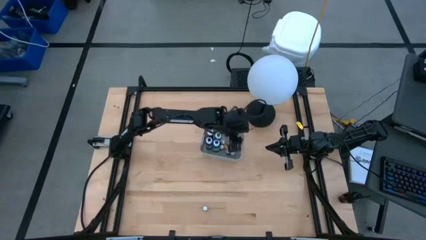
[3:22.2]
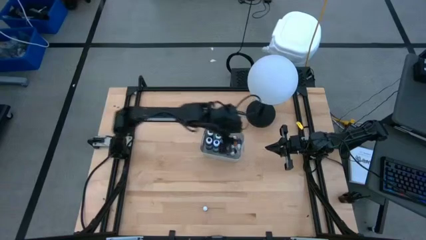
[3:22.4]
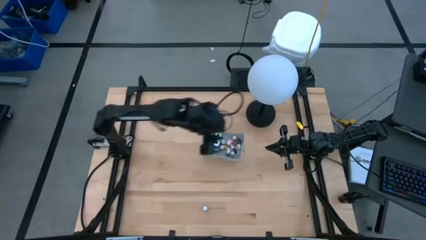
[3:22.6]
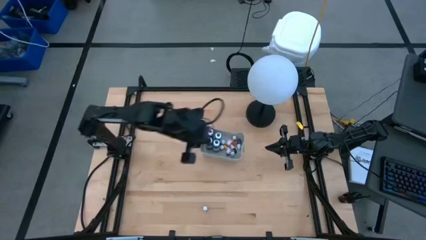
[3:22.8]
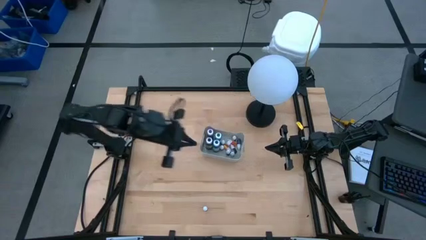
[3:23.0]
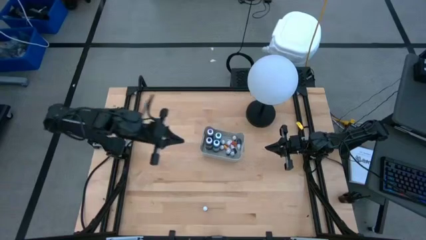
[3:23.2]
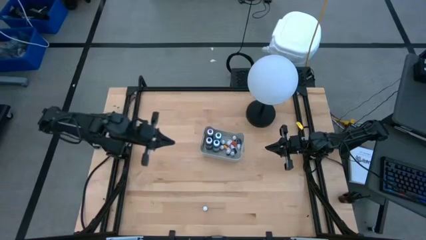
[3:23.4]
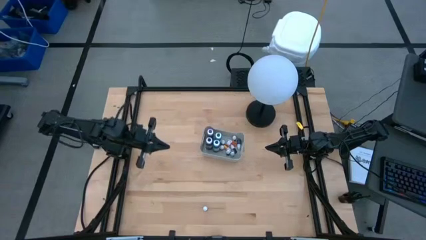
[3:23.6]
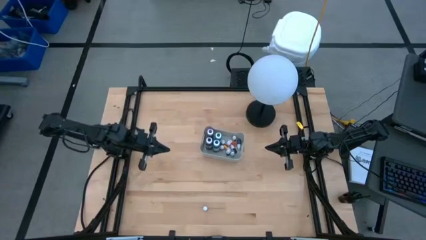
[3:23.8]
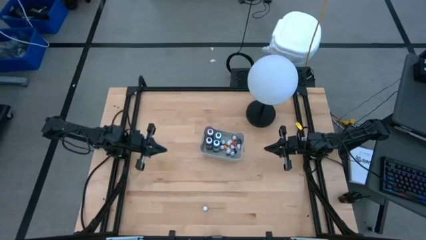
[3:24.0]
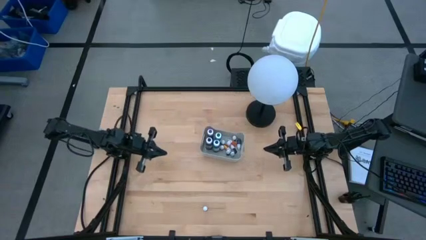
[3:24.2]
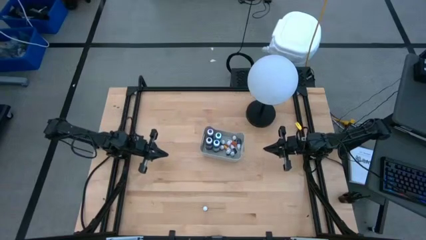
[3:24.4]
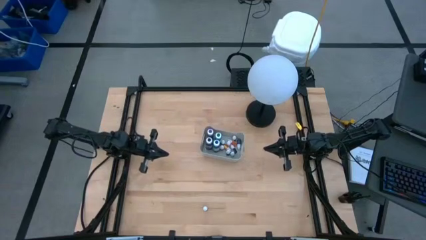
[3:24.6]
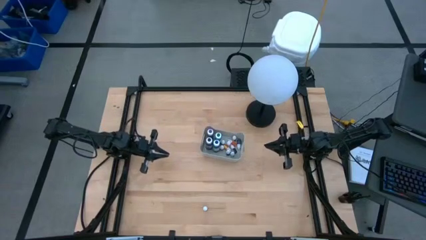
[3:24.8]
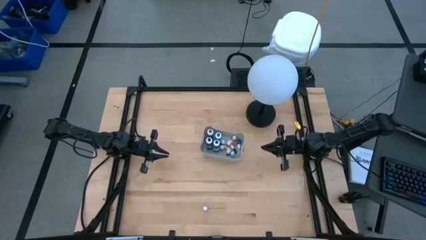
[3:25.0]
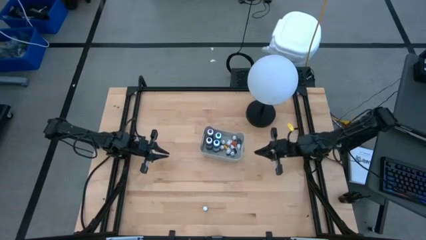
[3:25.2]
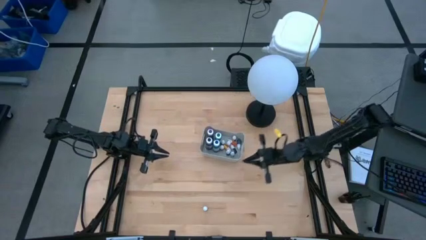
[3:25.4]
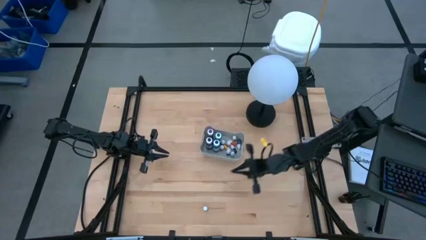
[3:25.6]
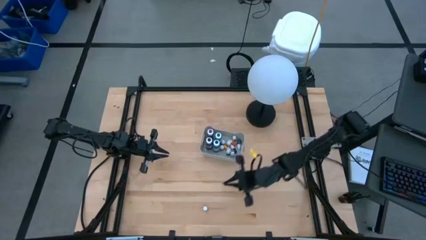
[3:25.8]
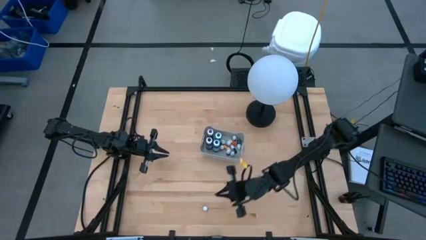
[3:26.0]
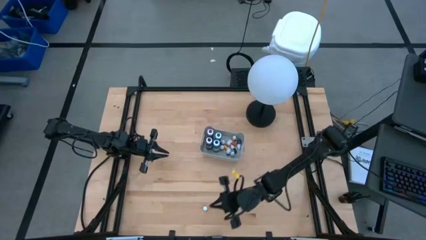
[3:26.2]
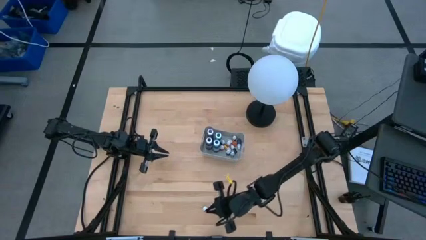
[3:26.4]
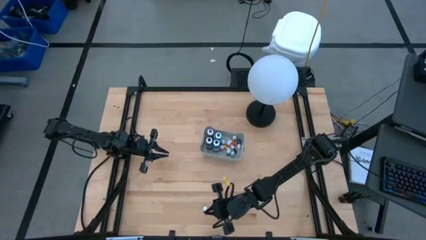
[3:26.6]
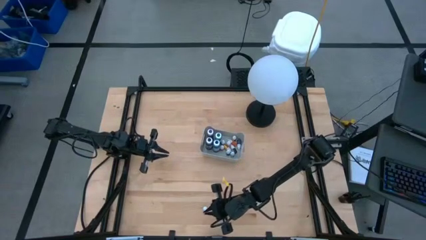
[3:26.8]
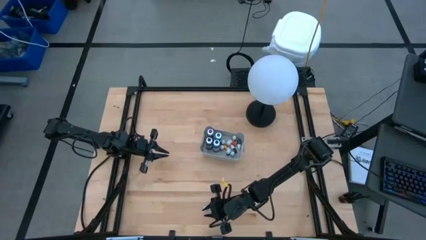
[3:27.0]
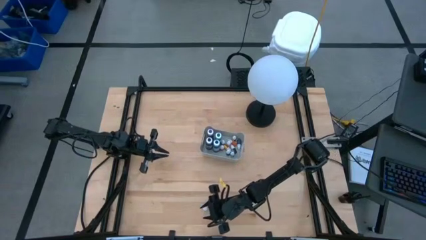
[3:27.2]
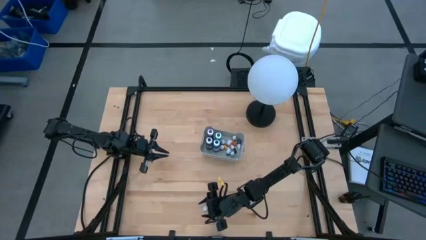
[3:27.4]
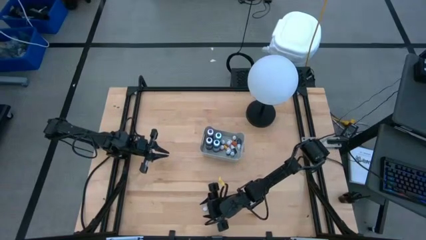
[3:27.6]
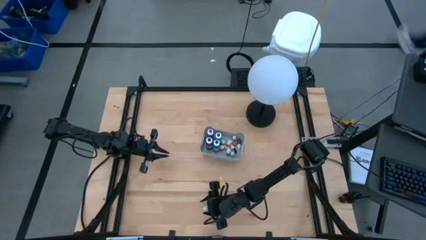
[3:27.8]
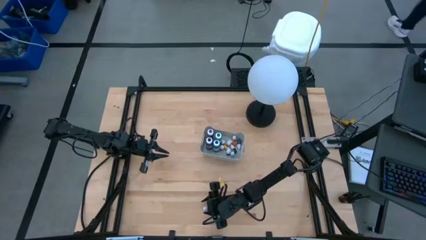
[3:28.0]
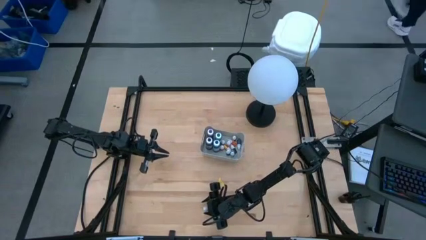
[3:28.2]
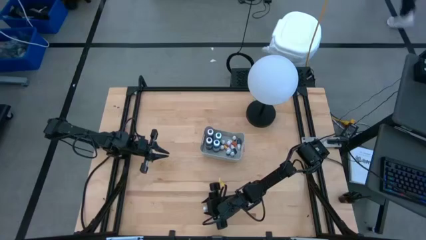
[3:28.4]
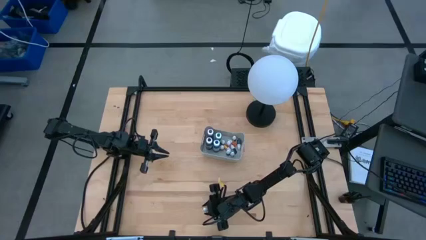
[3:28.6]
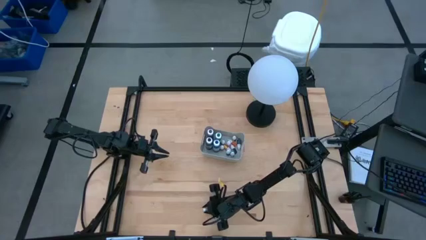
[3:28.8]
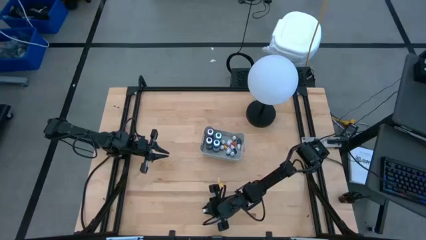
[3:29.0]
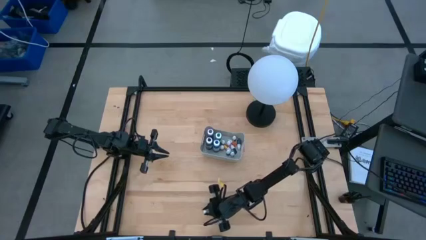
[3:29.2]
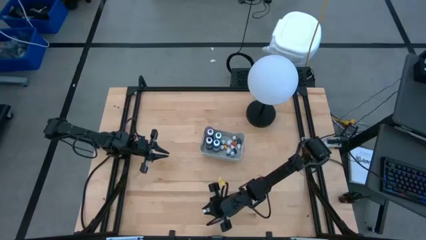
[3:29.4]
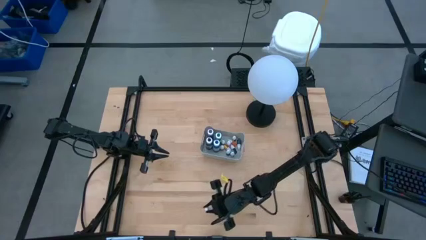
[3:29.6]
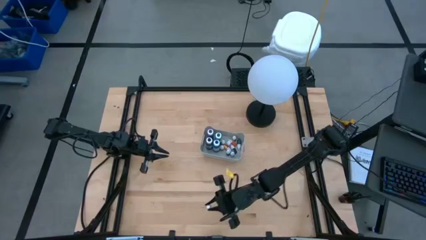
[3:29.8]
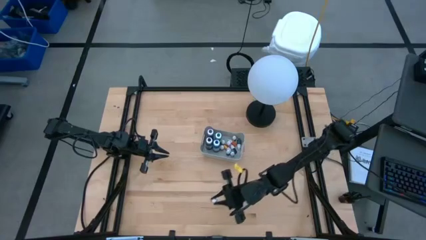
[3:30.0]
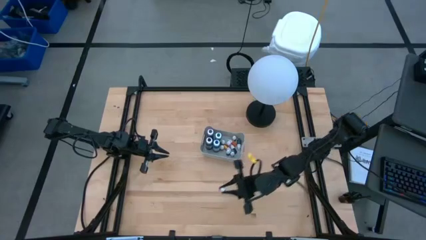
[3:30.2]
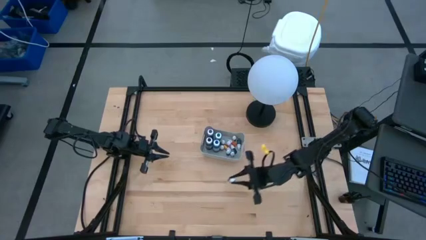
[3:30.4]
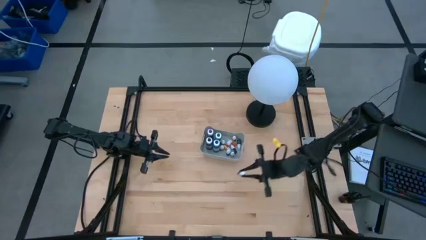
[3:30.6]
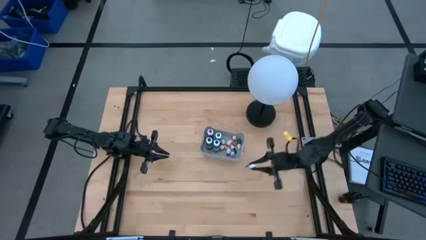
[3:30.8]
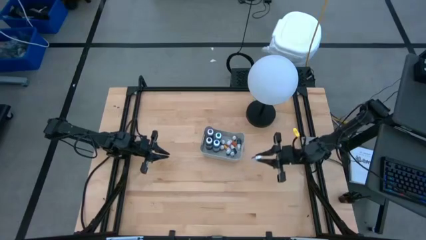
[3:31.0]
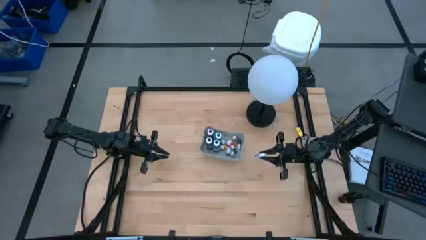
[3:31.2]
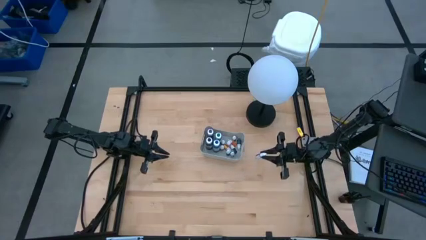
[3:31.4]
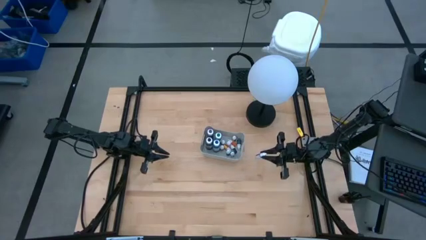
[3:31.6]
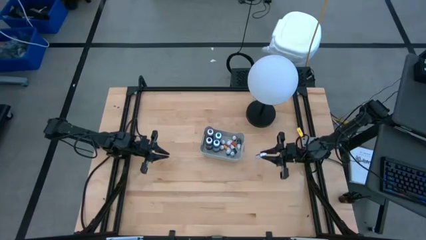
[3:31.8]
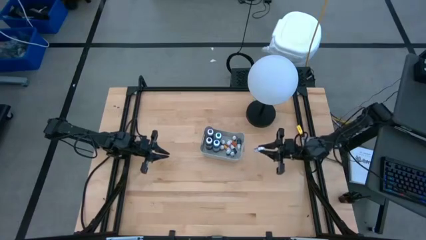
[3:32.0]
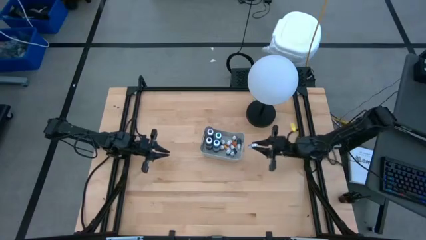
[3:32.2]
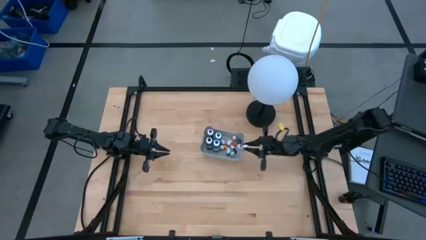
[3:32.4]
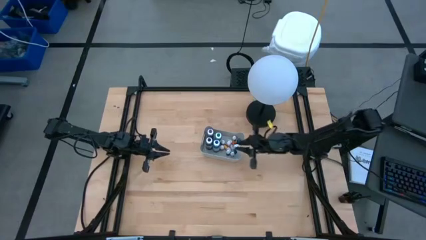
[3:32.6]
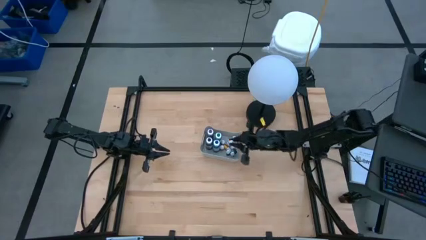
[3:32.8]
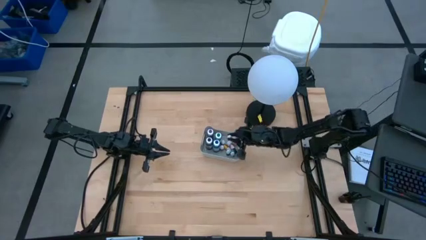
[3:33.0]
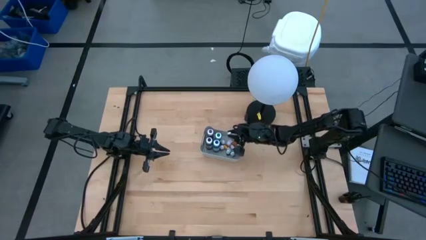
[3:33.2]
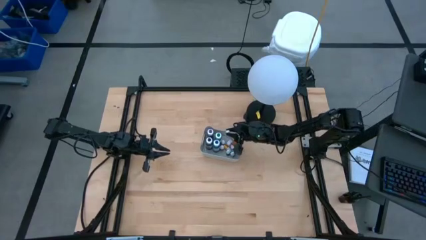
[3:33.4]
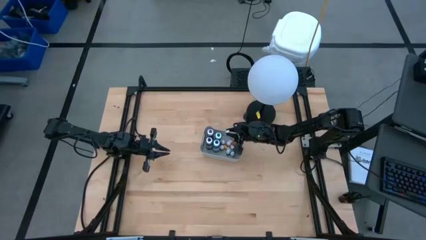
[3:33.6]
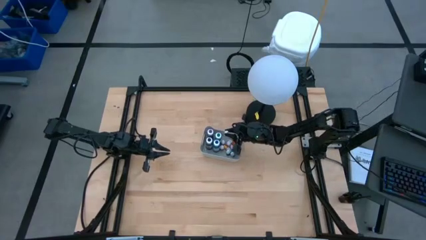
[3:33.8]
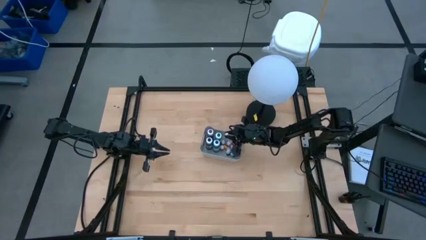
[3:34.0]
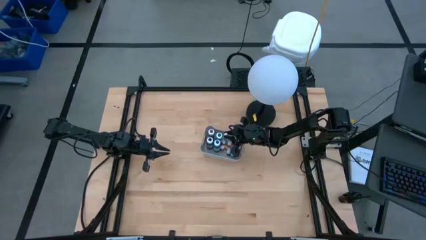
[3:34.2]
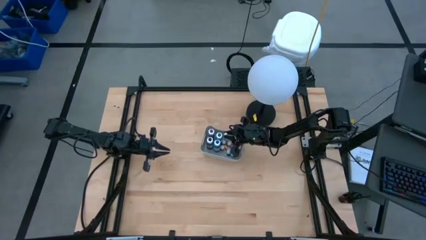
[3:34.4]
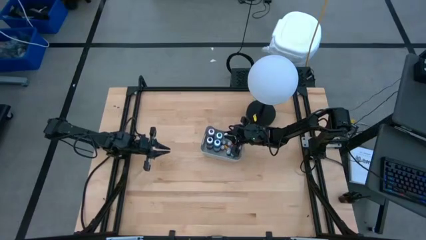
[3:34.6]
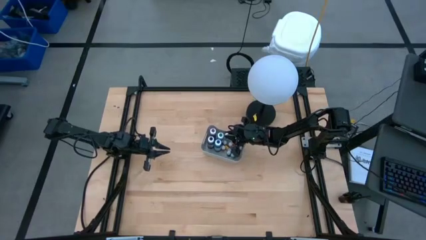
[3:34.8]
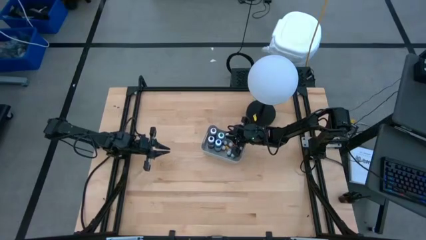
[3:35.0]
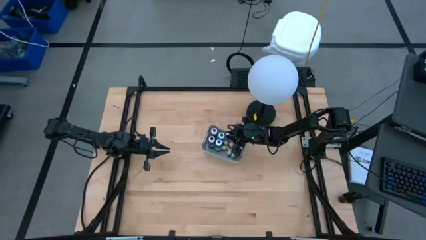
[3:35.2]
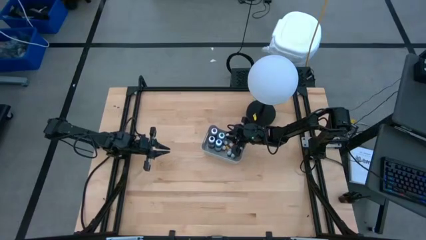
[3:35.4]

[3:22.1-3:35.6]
Task: Pick & Place food coloring
Put the small purple food coloring bottle into the gray bin

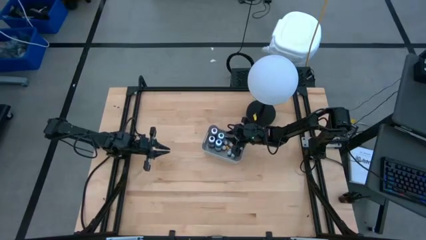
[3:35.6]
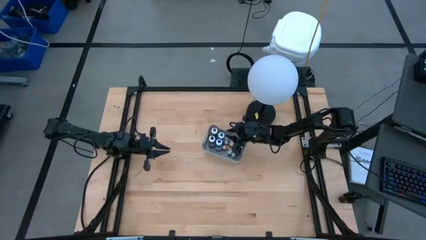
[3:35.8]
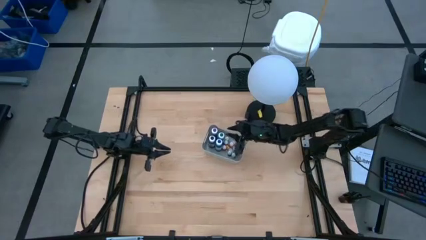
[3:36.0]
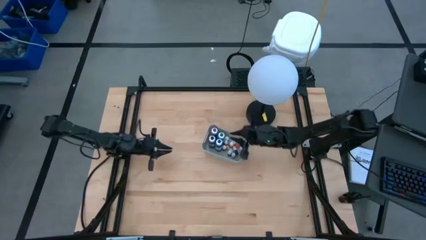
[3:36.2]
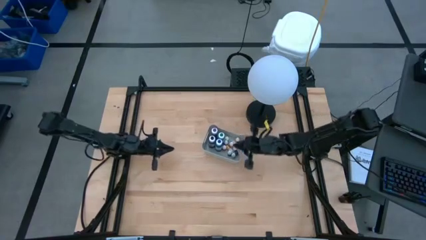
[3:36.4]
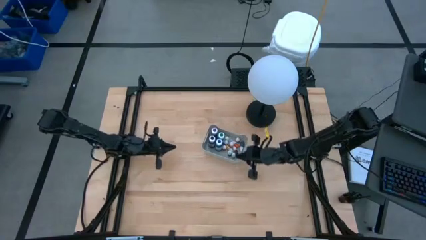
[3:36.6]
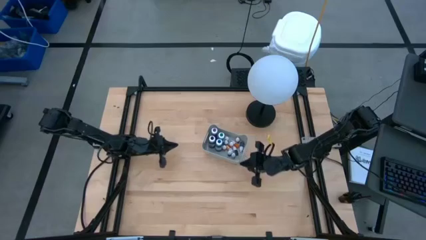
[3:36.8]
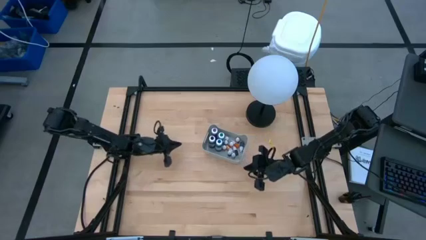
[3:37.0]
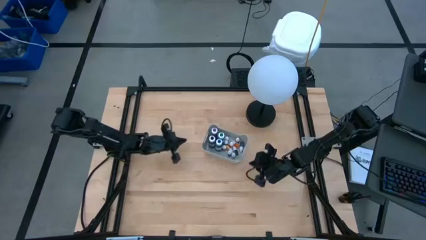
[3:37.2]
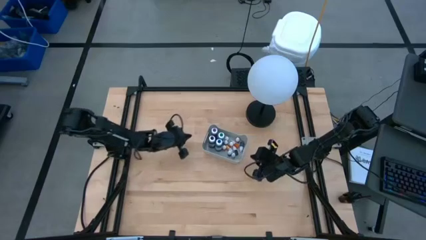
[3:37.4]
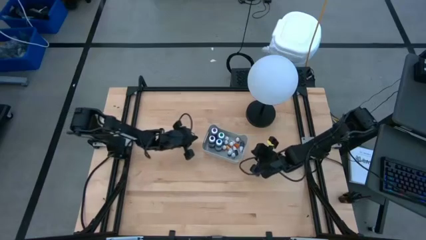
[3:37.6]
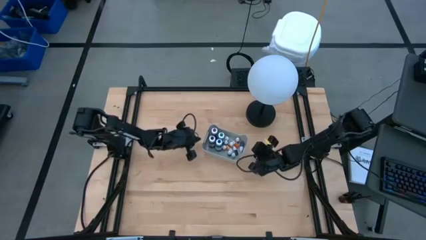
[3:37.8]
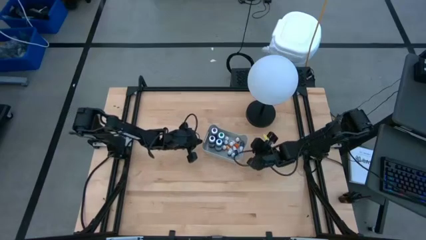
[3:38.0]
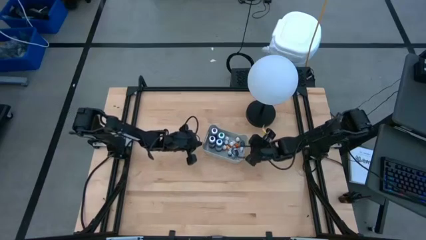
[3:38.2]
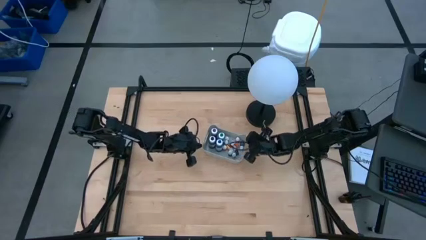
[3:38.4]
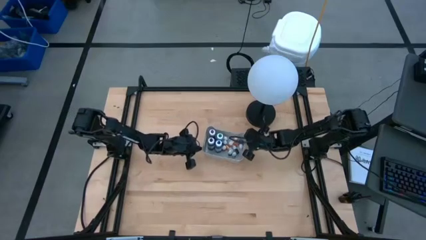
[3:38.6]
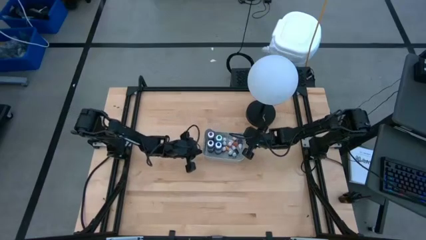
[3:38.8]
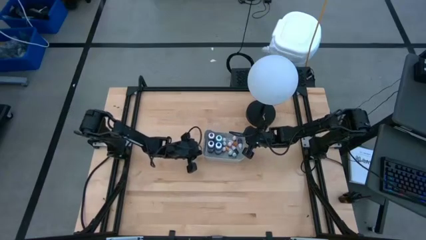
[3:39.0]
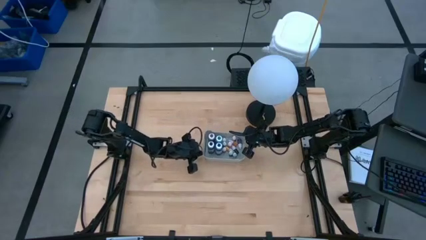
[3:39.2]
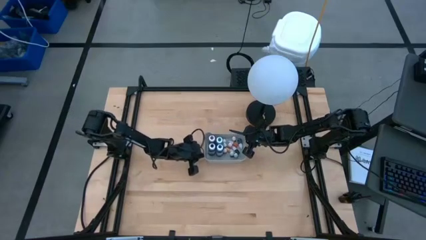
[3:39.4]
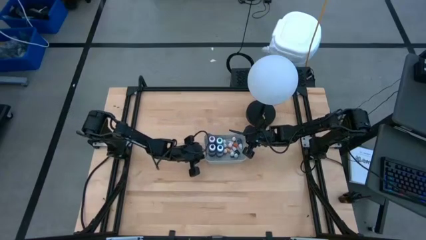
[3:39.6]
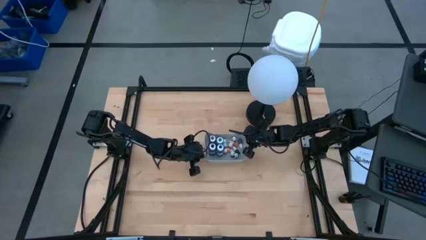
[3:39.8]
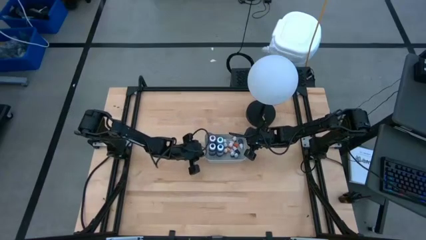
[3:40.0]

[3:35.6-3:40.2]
Adjust the gray bin on the table
